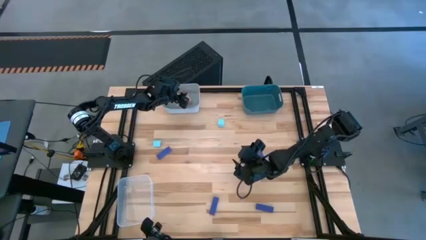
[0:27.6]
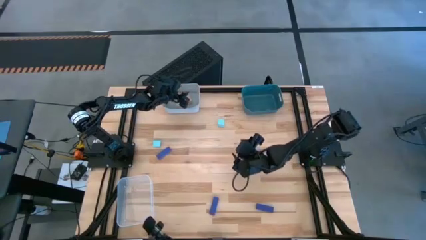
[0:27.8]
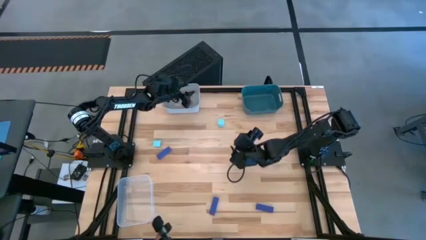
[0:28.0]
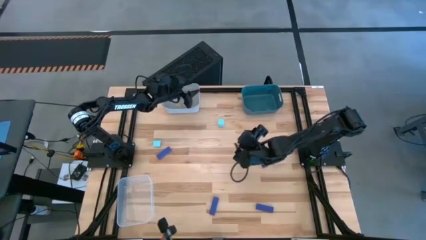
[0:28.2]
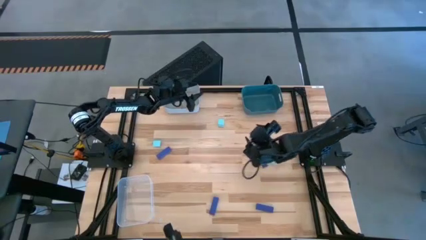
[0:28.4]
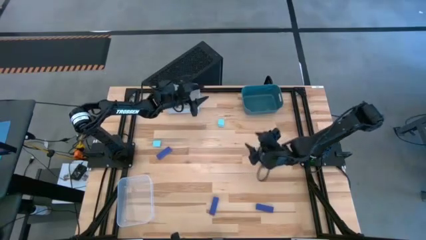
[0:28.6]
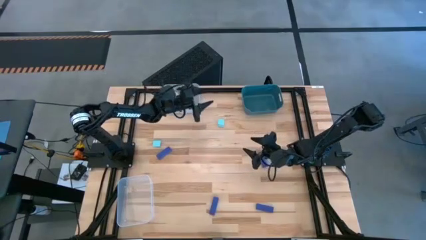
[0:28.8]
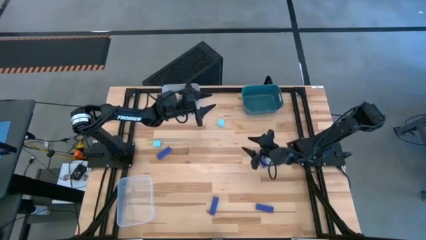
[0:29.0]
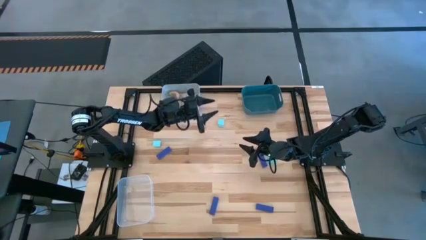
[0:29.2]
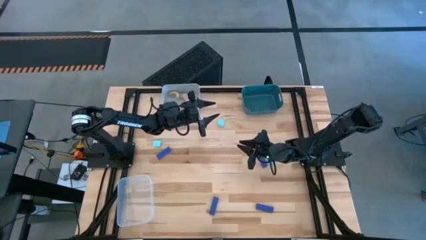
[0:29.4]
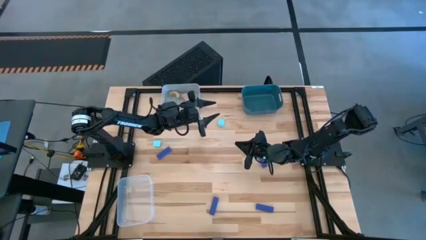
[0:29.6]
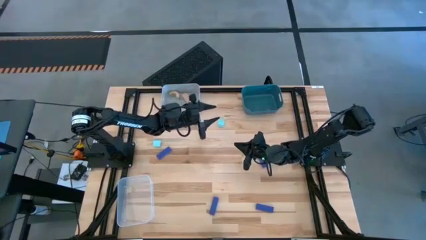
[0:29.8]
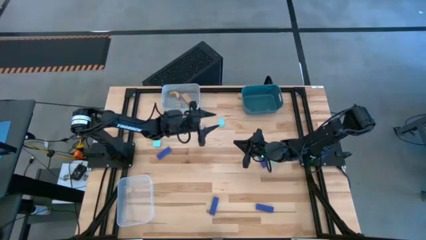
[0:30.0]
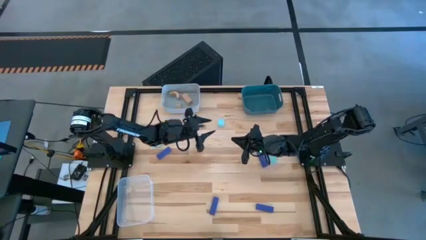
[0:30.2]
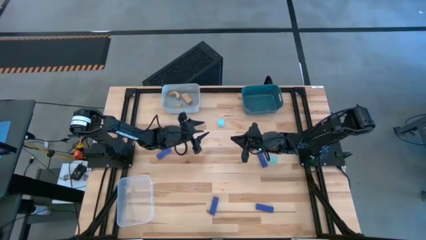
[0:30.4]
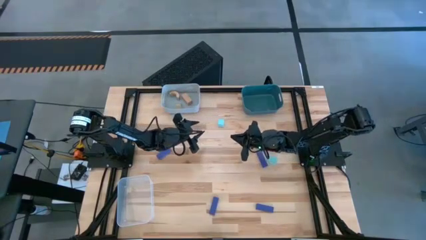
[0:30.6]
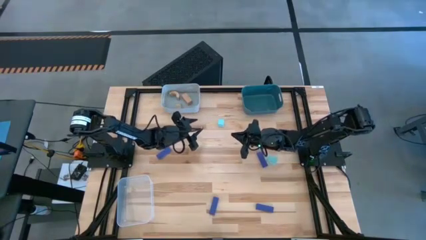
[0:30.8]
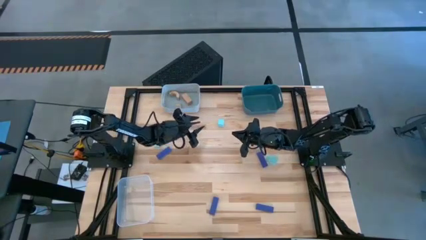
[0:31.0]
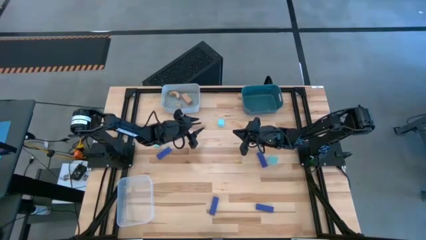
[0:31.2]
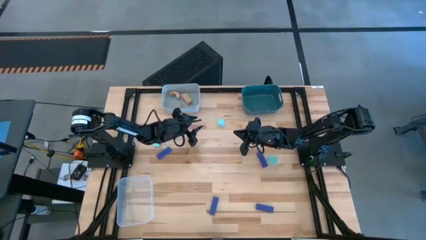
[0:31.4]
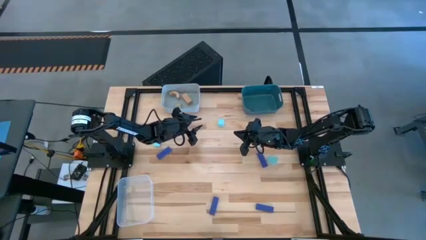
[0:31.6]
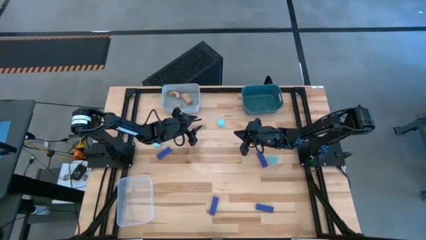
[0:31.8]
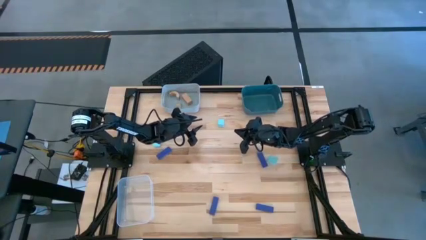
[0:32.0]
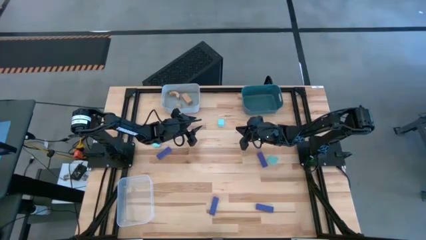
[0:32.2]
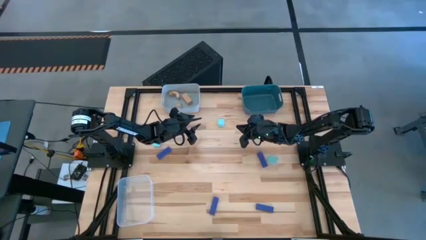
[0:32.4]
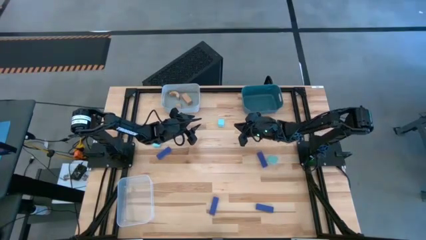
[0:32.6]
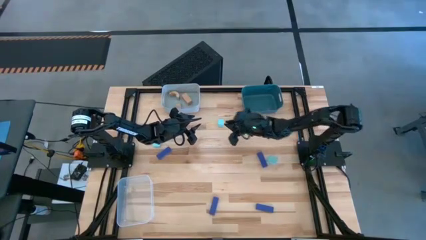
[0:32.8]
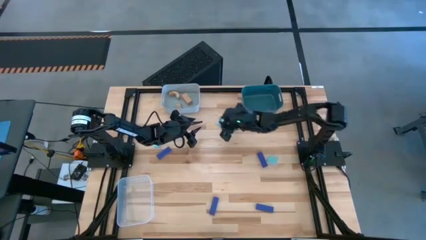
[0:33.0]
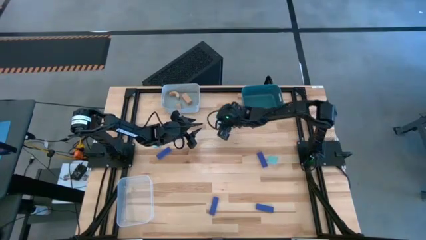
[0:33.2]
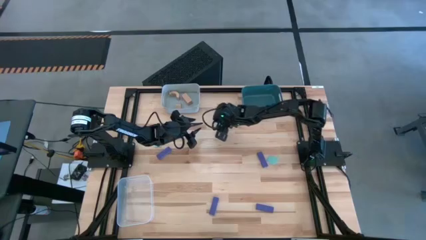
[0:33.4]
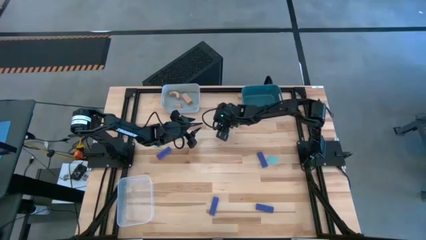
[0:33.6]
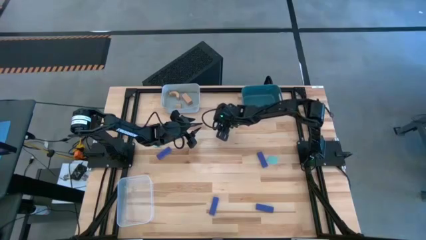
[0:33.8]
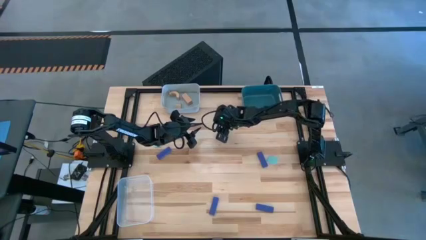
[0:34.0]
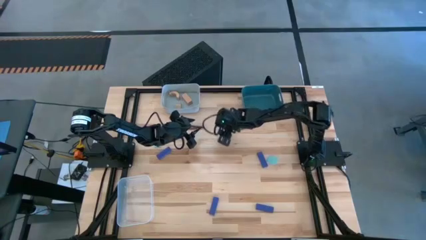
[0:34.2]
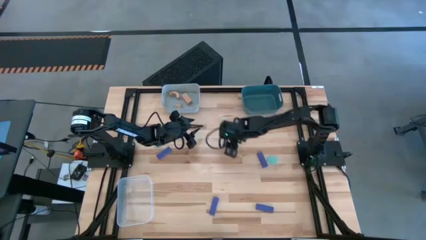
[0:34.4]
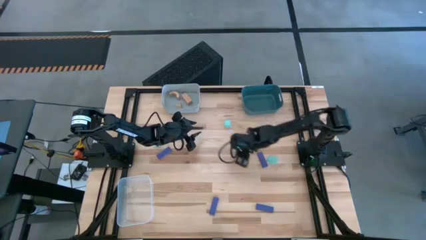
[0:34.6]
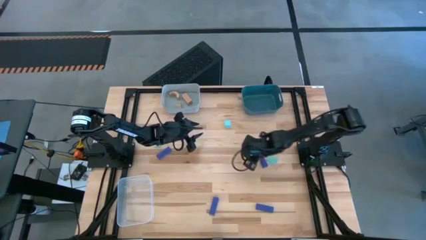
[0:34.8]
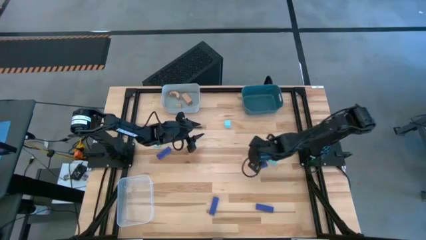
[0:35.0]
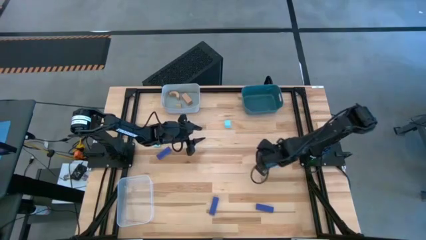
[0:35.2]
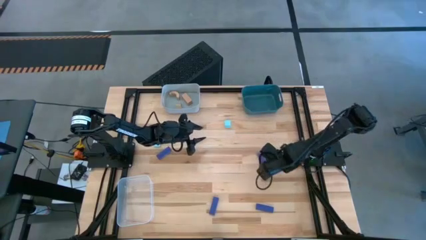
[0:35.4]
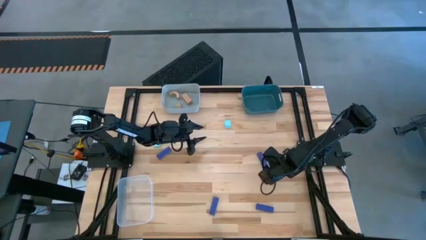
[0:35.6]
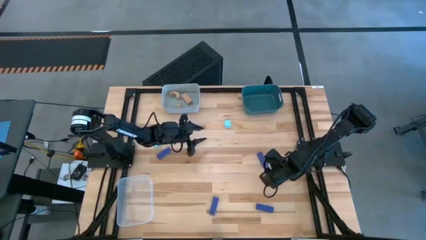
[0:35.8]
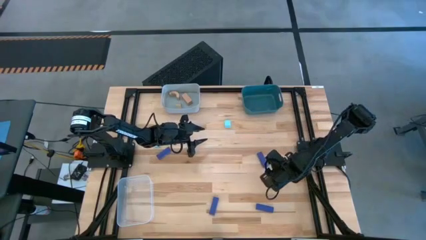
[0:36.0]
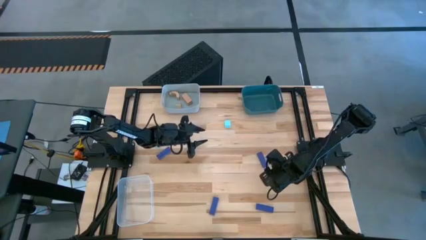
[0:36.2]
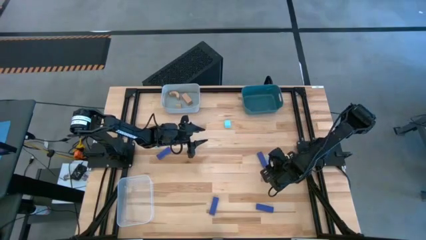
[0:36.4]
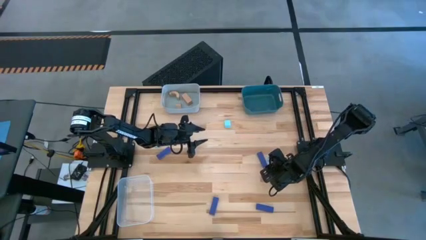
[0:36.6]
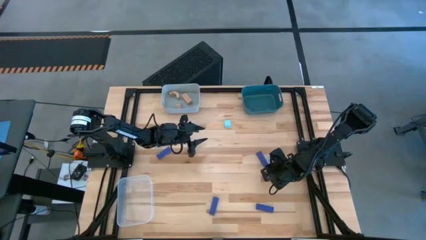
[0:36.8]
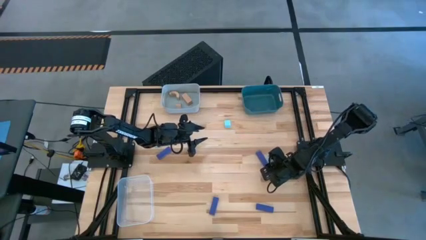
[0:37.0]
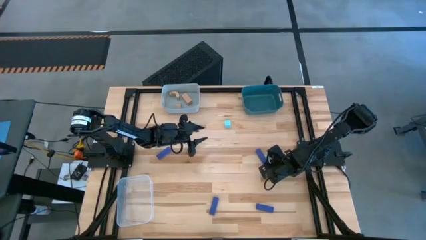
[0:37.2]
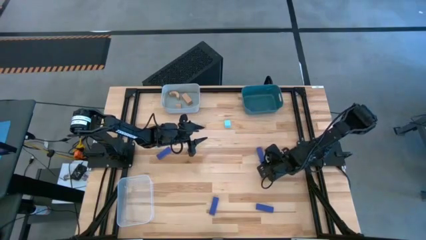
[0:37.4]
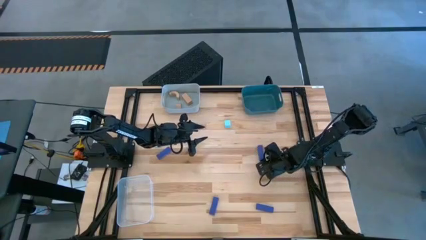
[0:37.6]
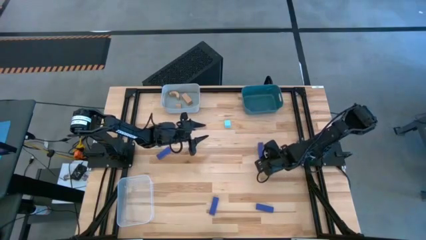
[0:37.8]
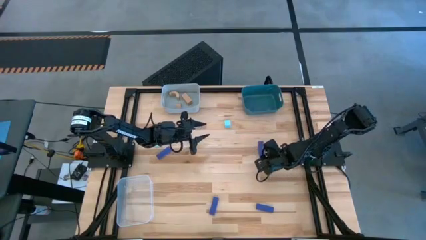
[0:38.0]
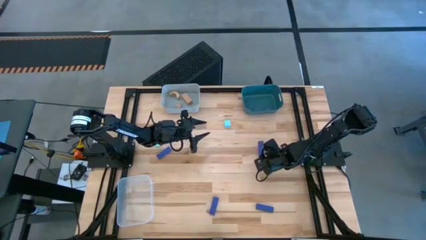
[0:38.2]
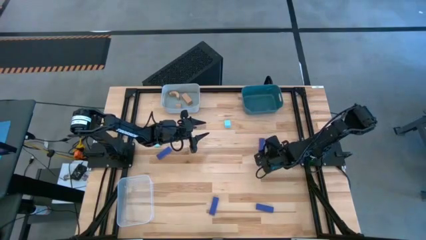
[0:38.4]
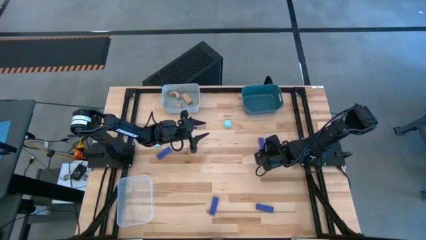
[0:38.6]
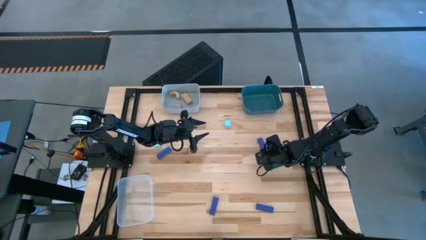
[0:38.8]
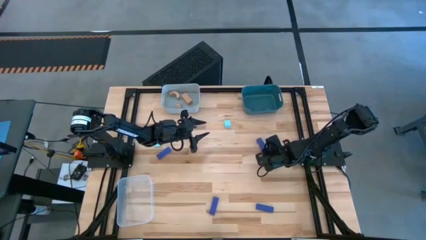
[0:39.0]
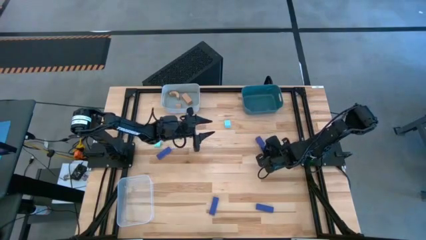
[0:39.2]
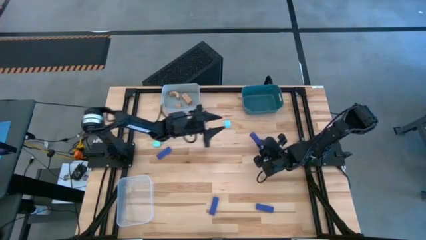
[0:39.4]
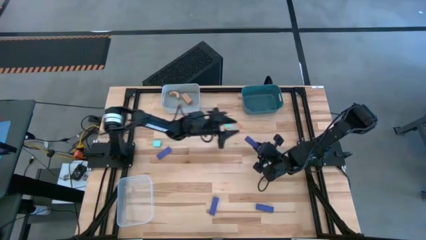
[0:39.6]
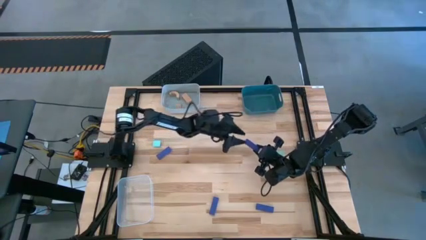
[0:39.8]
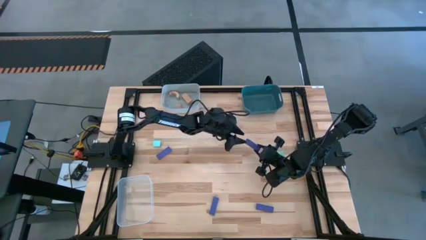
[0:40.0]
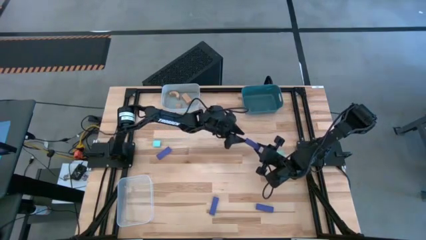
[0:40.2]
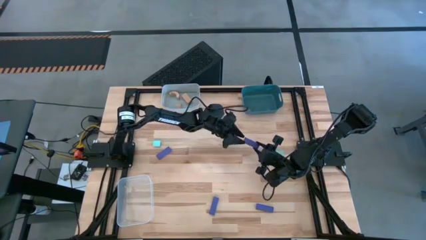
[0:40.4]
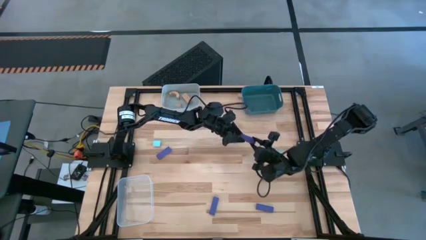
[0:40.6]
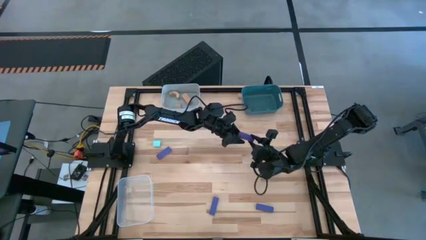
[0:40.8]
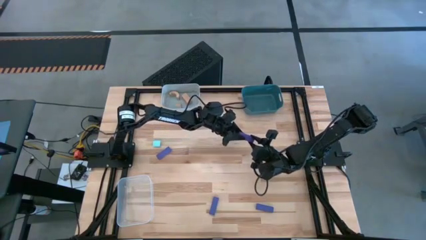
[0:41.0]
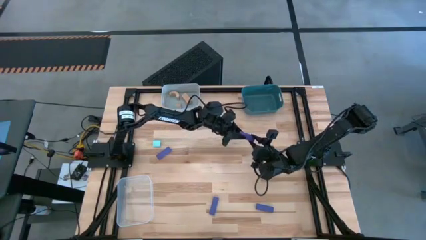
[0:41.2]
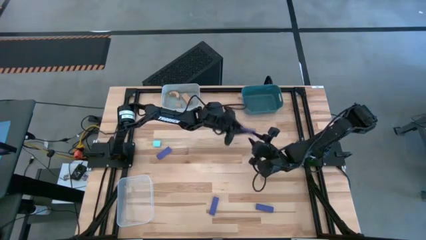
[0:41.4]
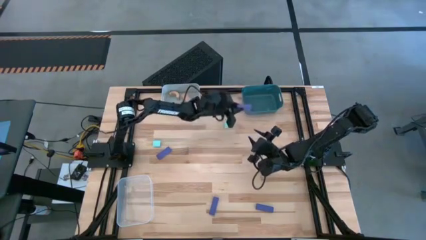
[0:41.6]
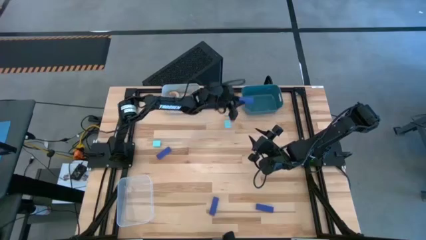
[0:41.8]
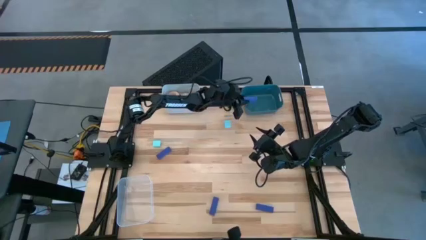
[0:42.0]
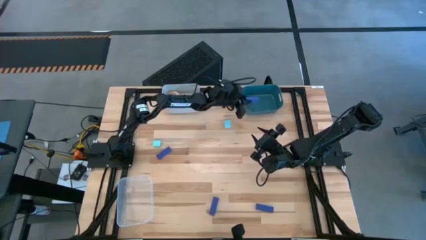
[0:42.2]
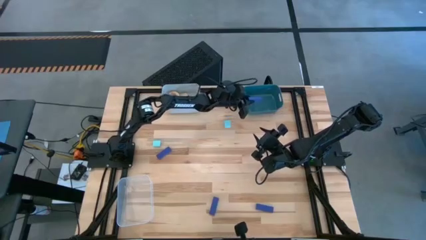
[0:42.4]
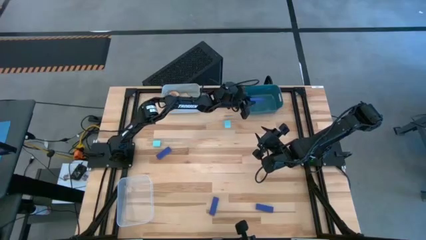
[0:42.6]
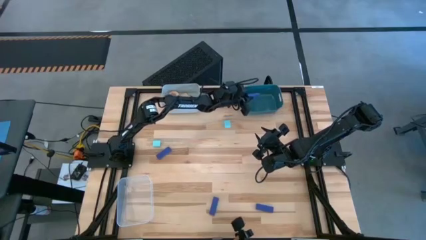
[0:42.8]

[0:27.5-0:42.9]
Task: Sort & place blocks by color
Put the violet block into the blue bin
